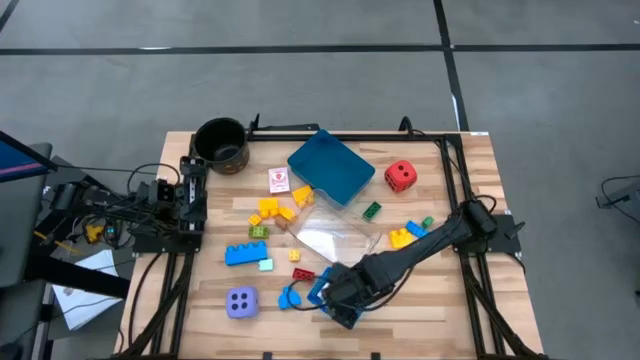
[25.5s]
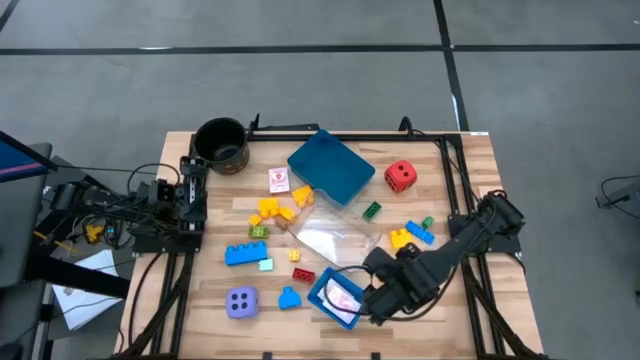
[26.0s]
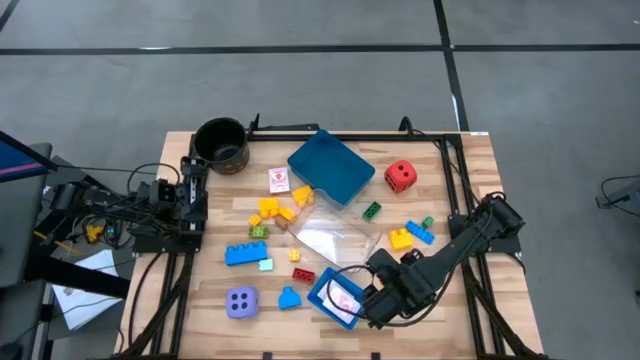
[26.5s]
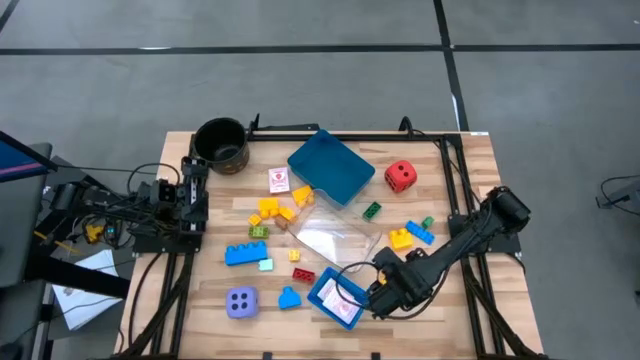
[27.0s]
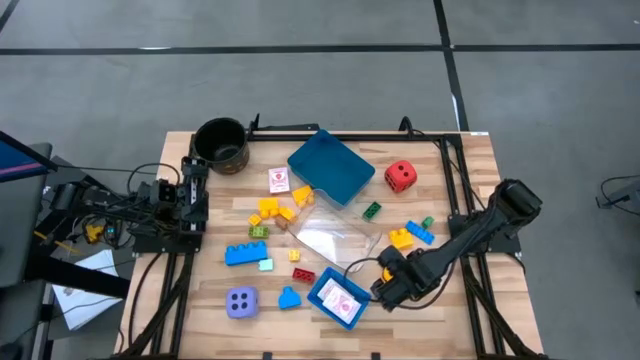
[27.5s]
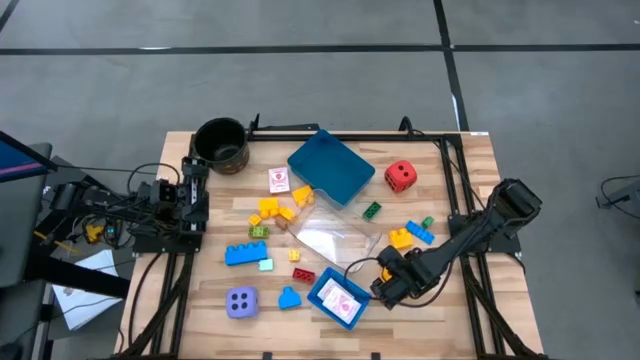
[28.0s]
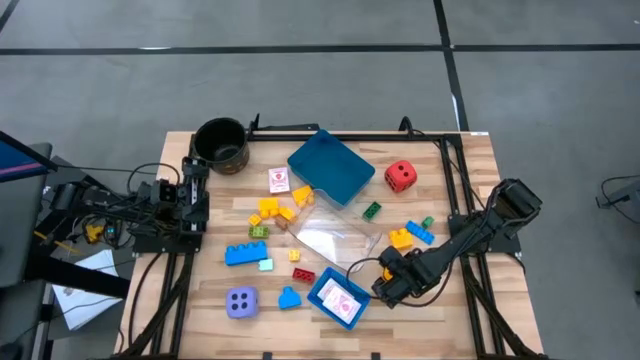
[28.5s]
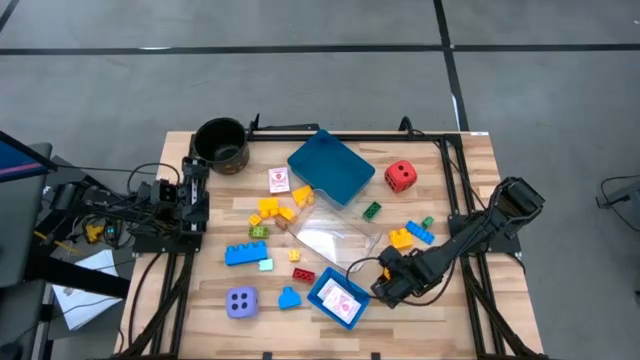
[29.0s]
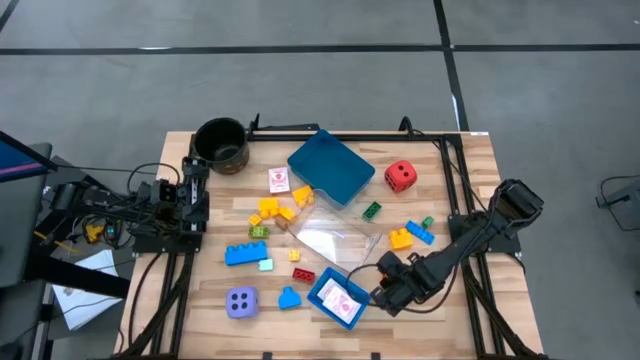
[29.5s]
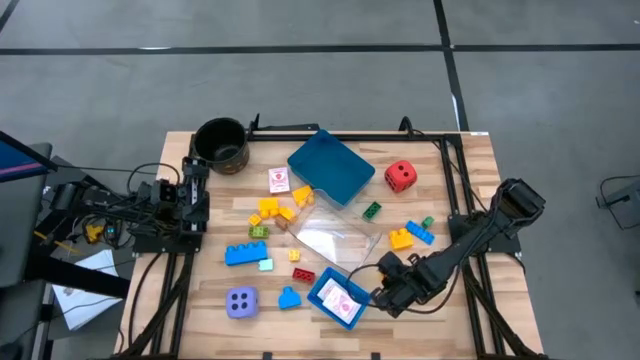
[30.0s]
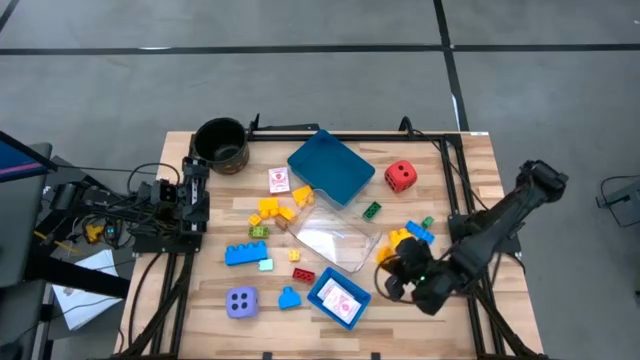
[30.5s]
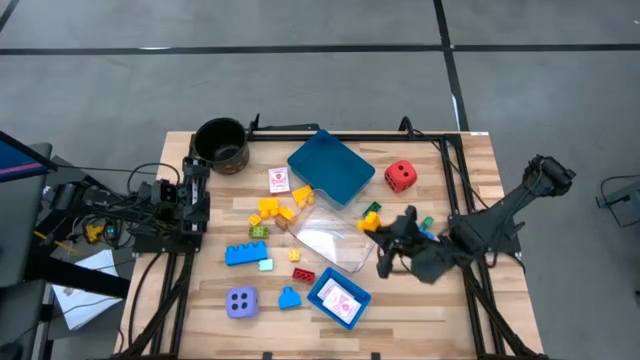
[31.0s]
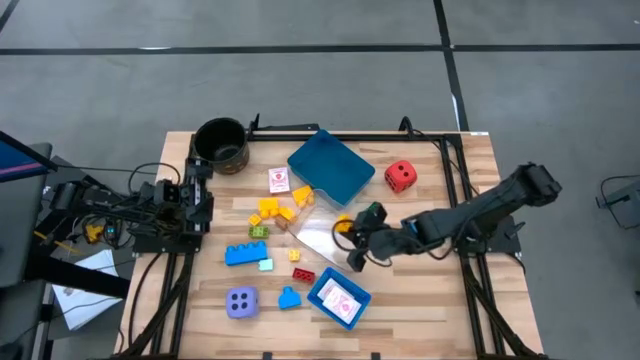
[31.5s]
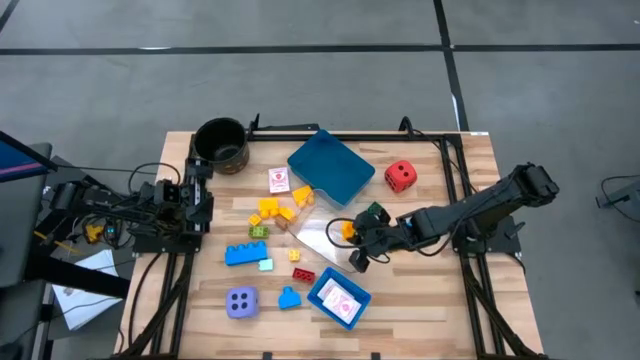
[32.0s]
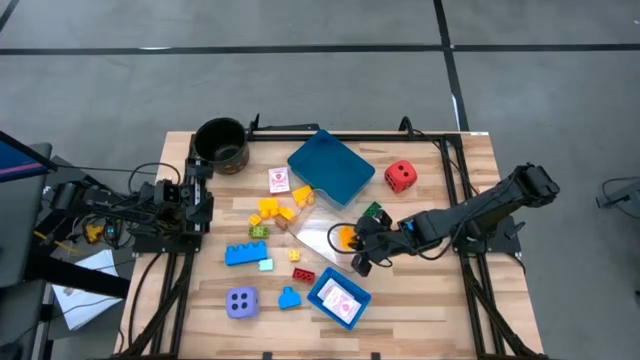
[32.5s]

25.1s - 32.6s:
Task: Pick & Place Toys
Put the yellow game piece block into the transparent bin

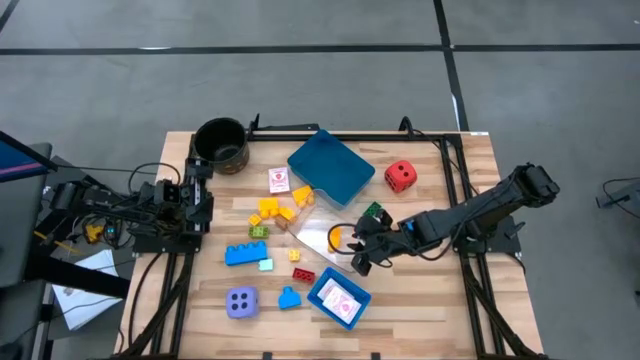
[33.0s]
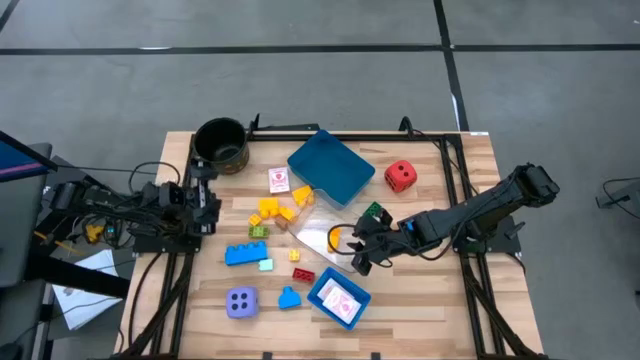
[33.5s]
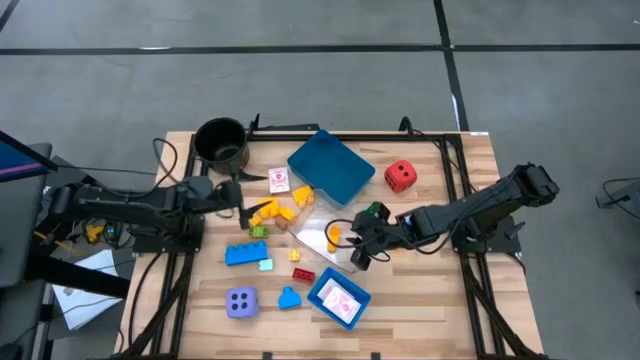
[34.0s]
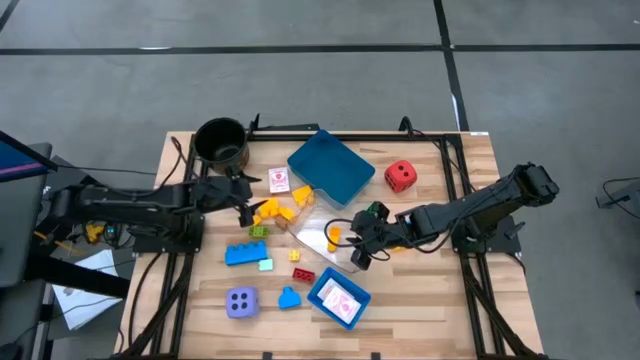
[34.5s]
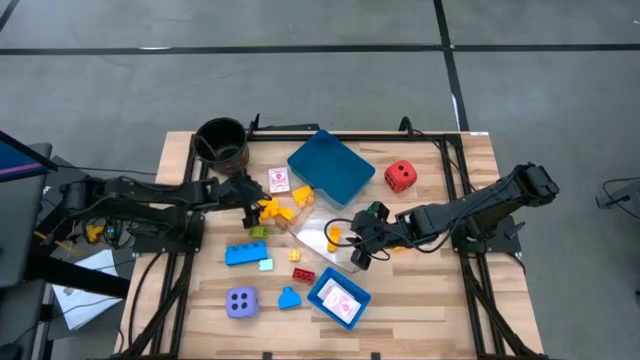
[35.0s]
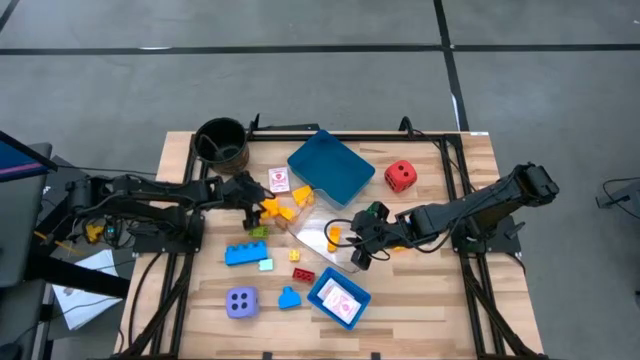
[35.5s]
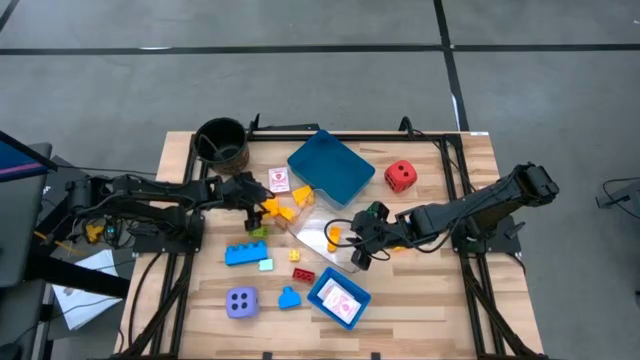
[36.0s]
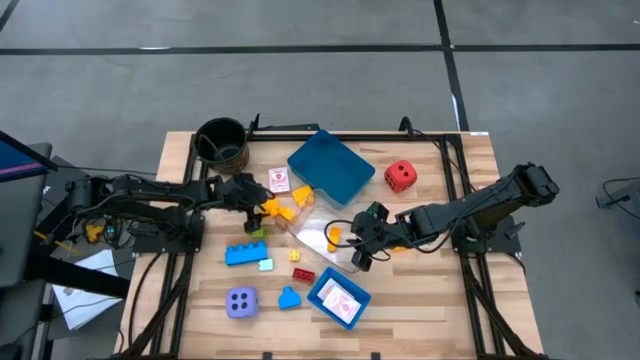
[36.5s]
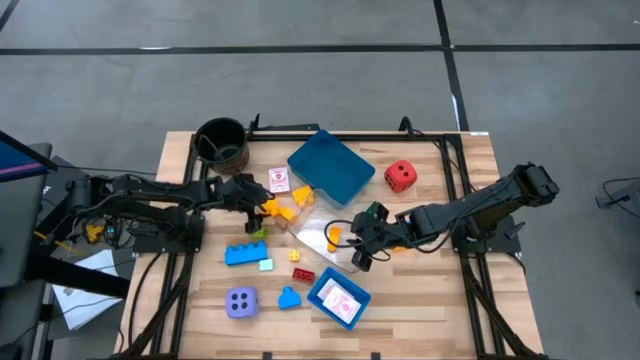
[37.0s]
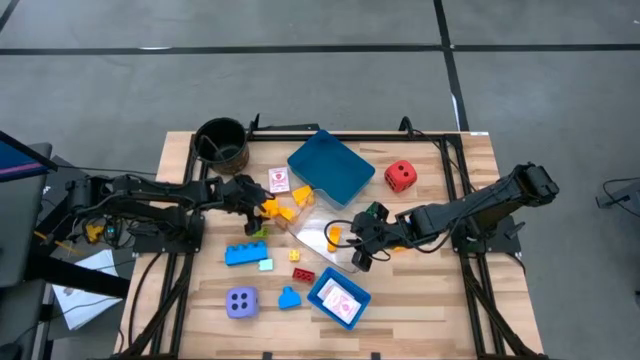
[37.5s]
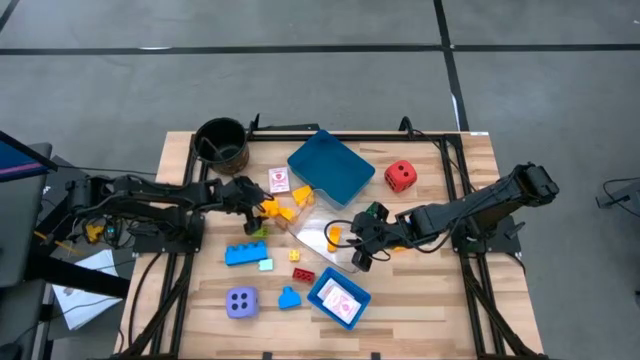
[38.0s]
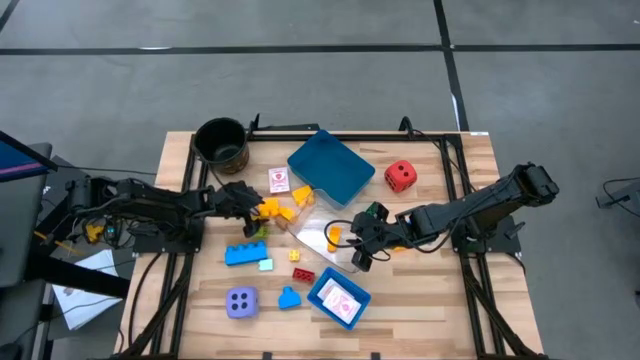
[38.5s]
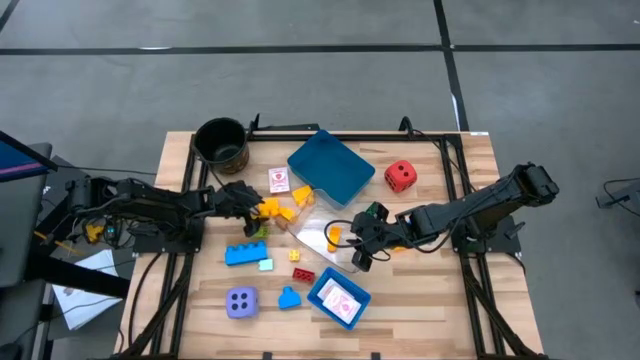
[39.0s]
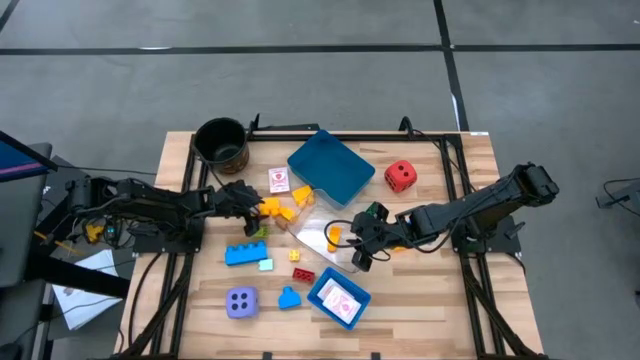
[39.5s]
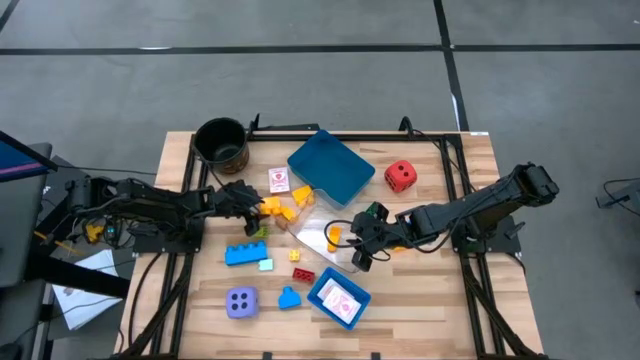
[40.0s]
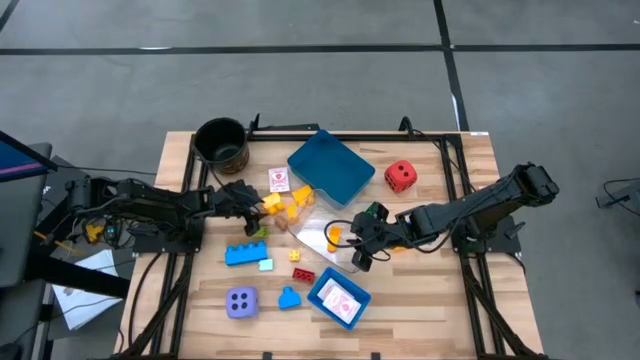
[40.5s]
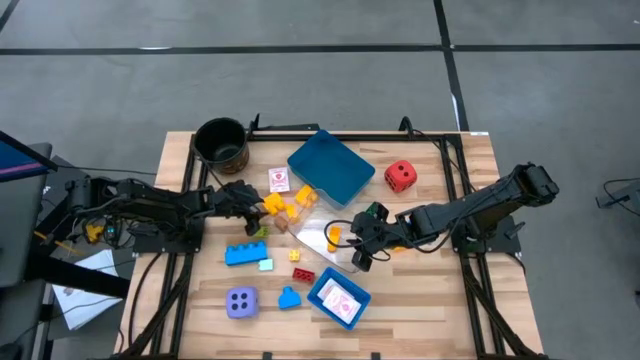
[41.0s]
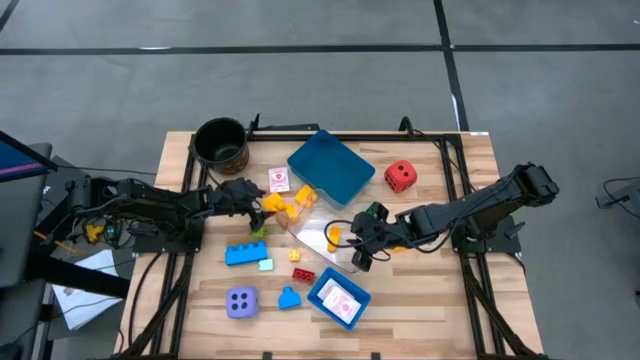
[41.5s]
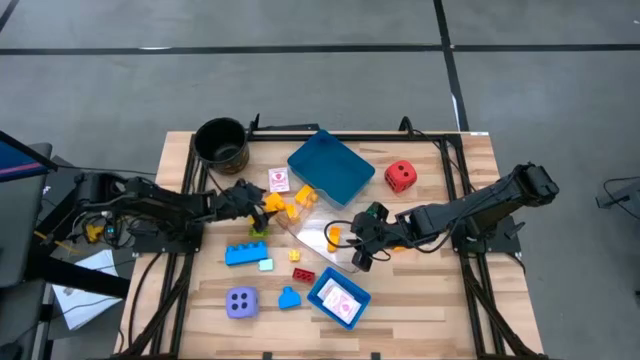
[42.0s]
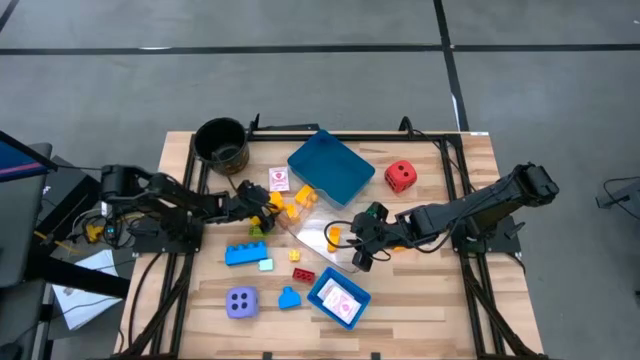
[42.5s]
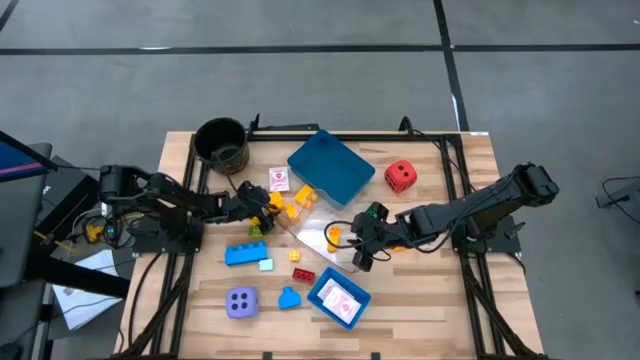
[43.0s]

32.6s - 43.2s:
Put the yellow game piece block into the transparent bin

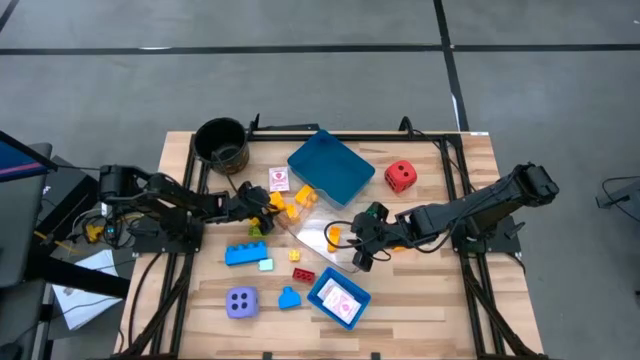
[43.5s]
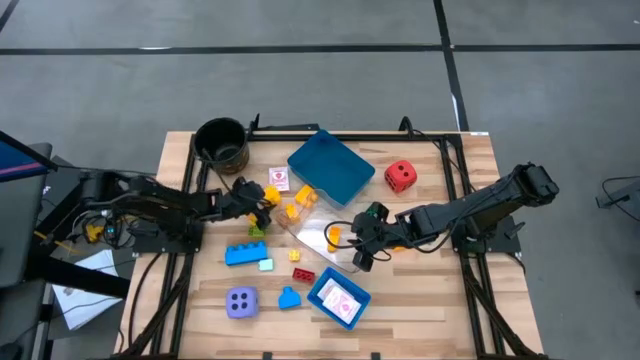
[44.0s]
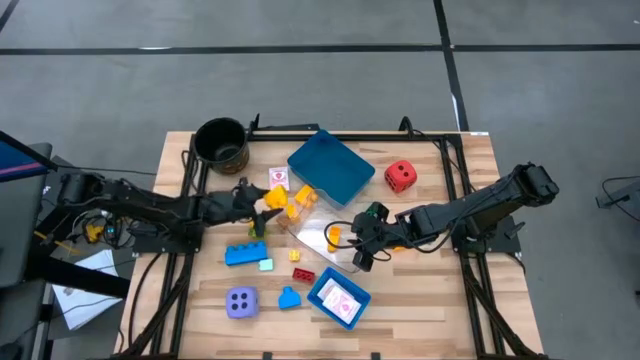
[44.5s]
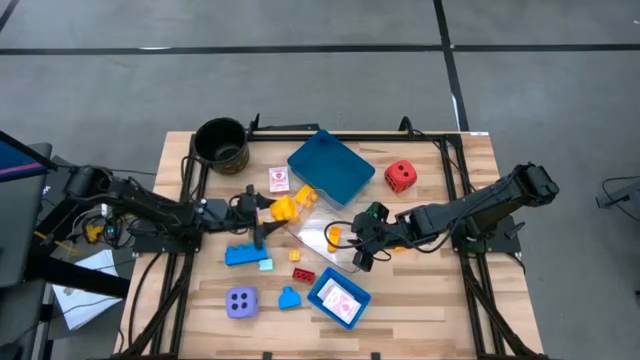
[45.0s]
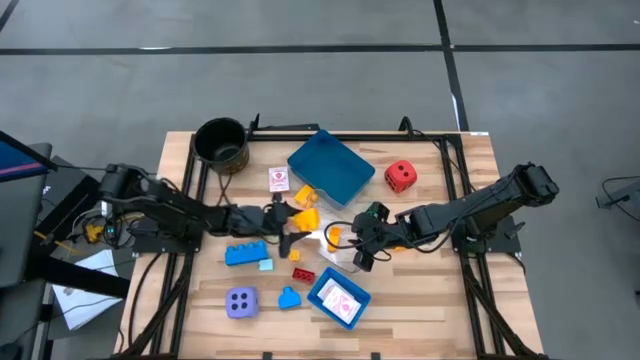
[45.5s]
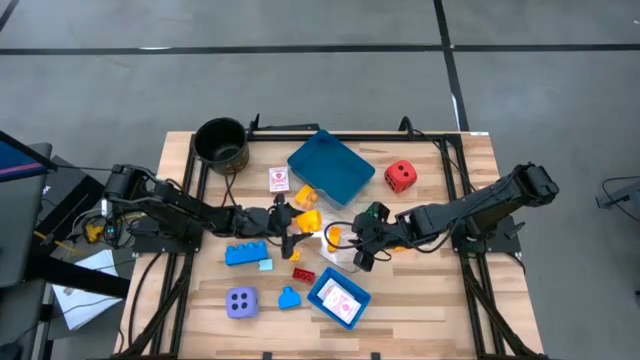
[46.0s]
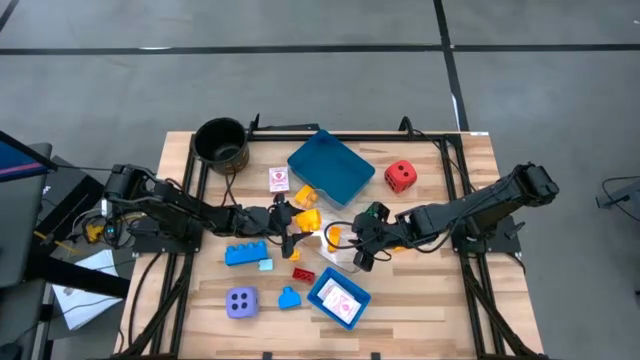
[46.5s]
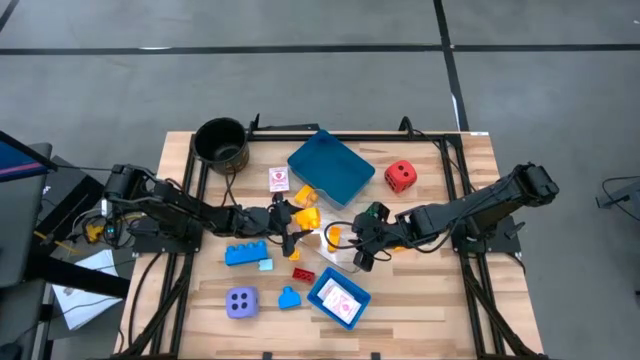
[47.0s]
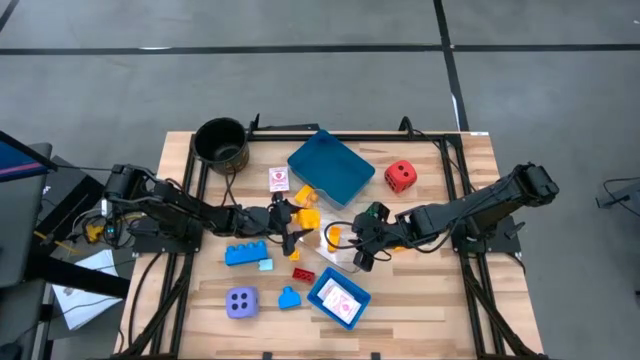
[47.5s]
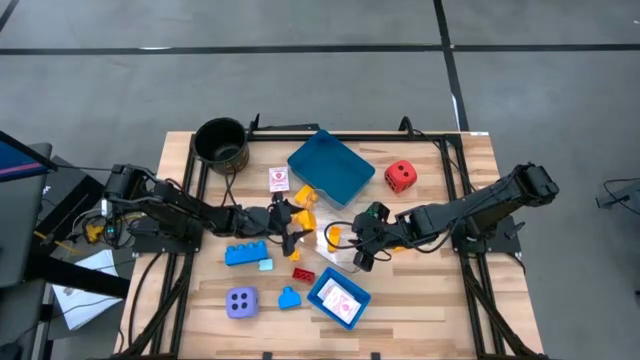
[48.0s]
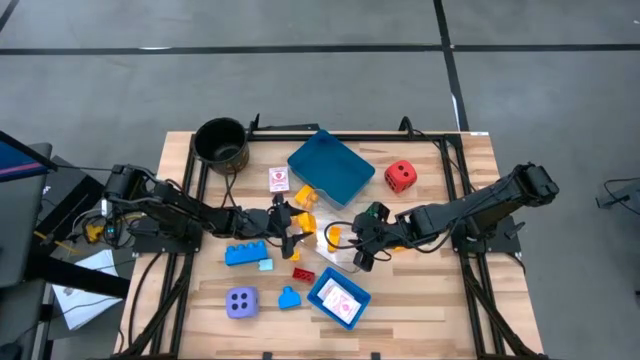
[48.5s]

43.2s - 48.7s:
Put the yellow game piece block into the transparent bin
